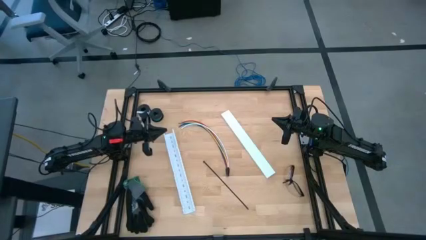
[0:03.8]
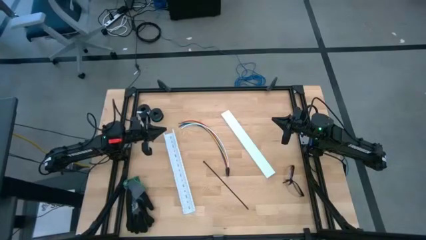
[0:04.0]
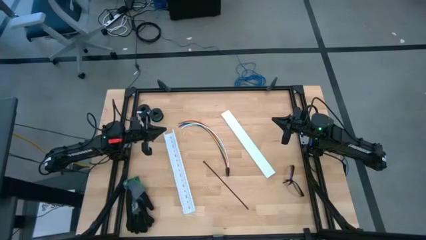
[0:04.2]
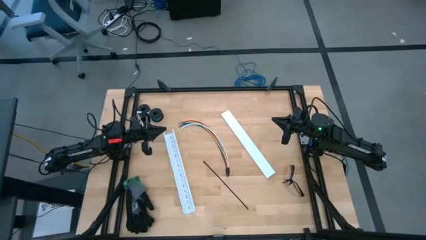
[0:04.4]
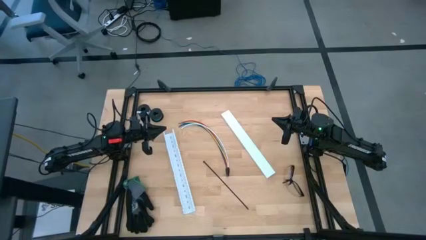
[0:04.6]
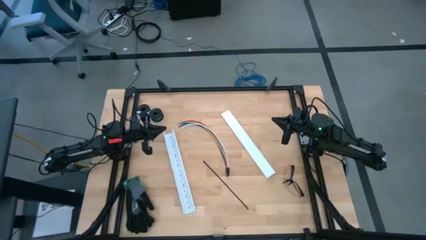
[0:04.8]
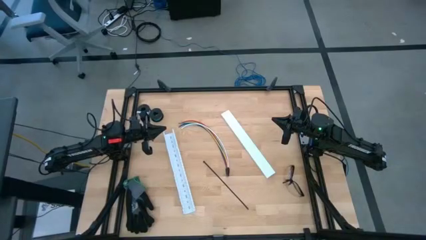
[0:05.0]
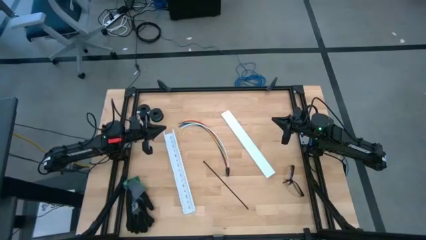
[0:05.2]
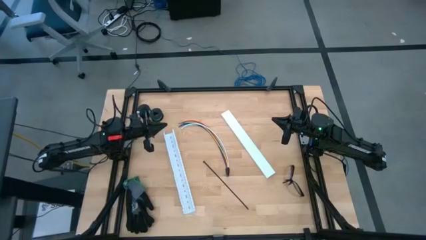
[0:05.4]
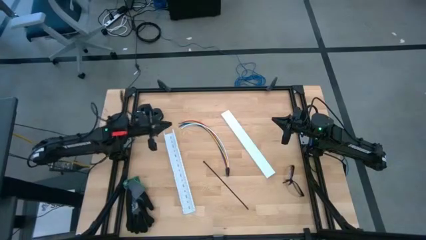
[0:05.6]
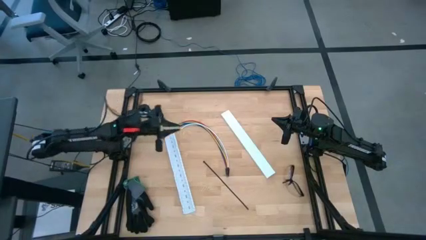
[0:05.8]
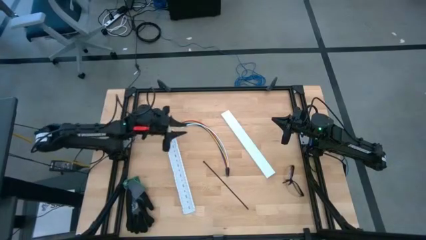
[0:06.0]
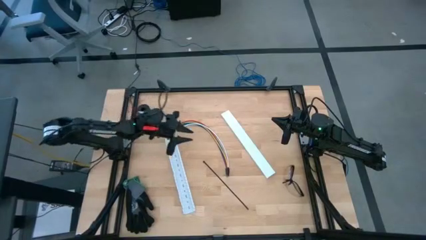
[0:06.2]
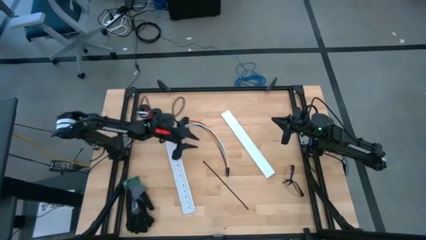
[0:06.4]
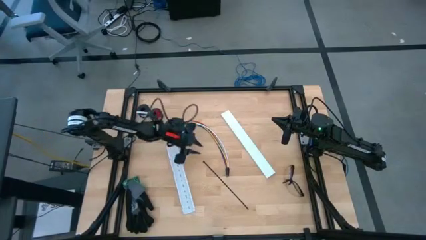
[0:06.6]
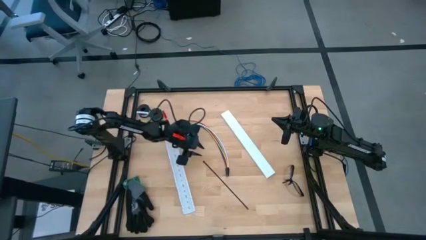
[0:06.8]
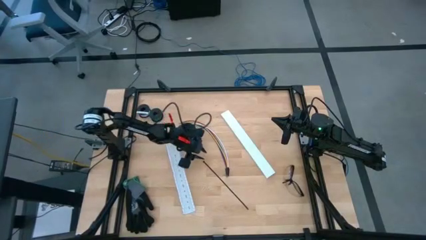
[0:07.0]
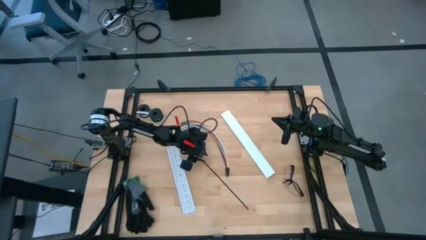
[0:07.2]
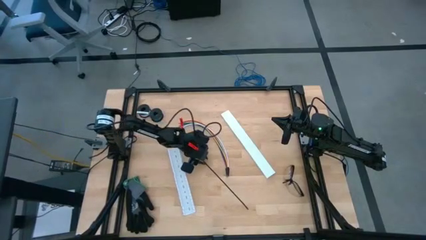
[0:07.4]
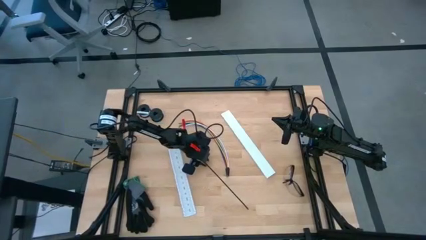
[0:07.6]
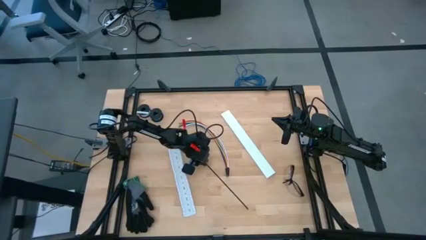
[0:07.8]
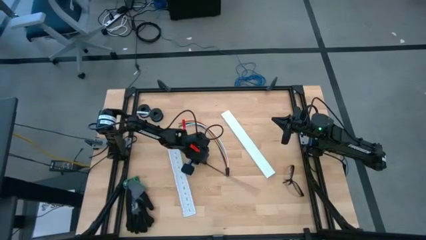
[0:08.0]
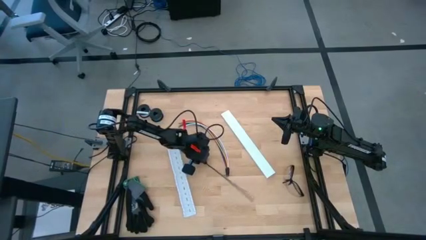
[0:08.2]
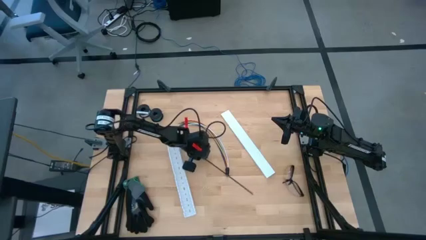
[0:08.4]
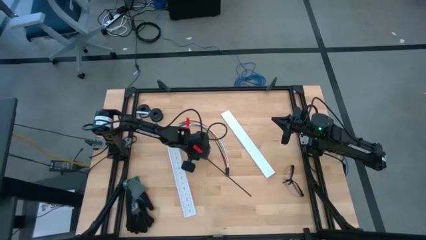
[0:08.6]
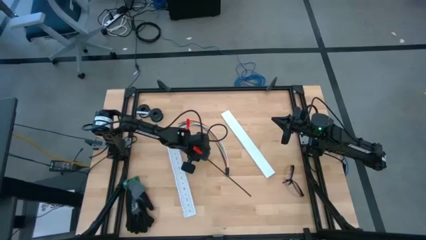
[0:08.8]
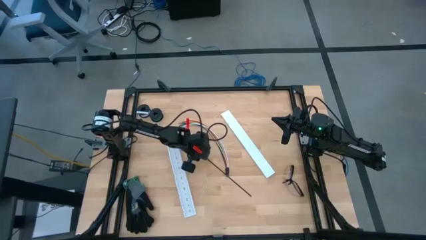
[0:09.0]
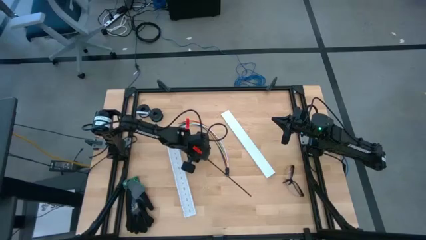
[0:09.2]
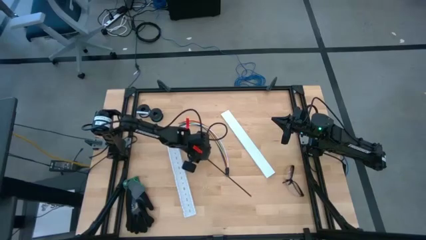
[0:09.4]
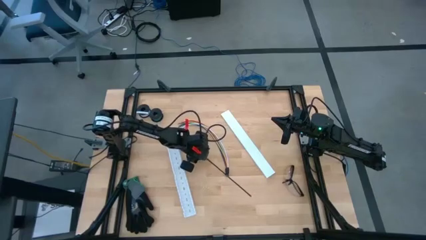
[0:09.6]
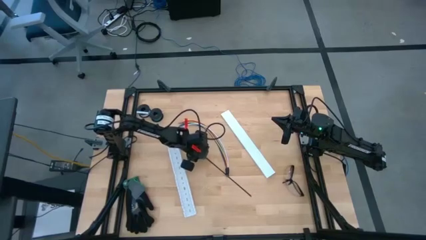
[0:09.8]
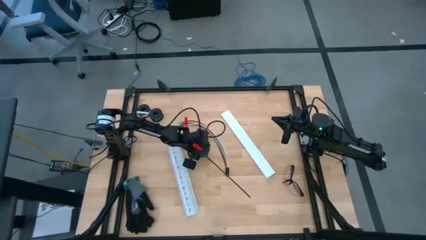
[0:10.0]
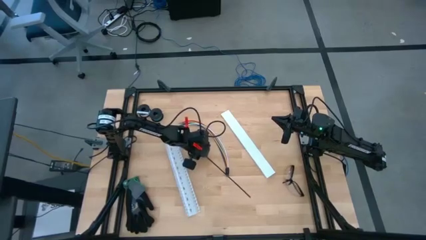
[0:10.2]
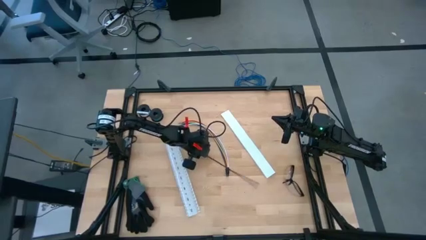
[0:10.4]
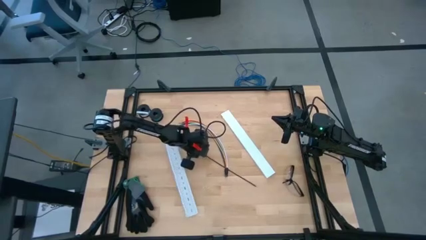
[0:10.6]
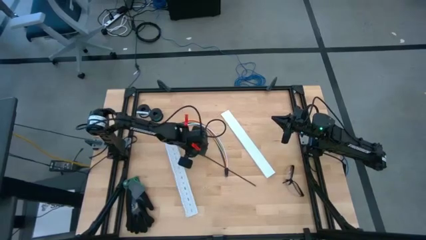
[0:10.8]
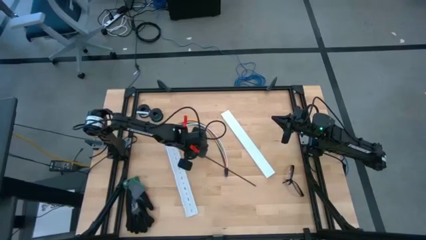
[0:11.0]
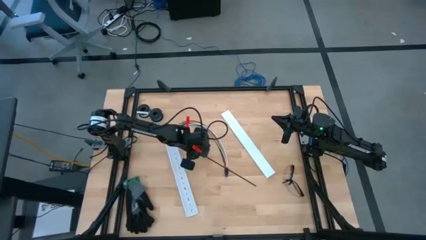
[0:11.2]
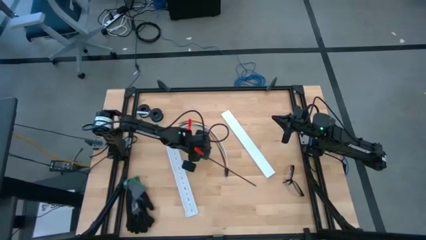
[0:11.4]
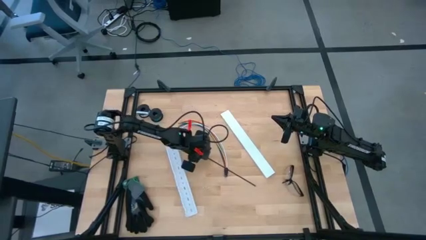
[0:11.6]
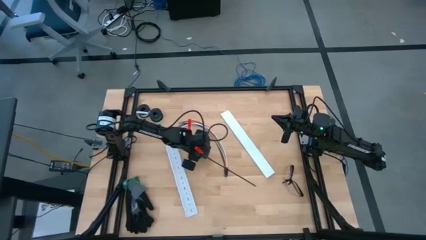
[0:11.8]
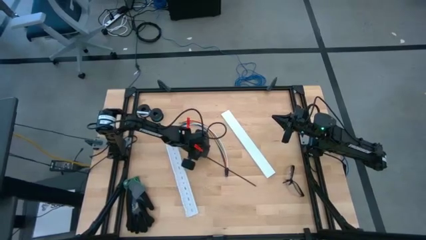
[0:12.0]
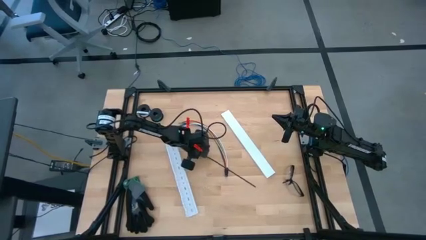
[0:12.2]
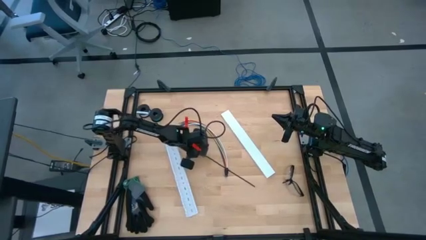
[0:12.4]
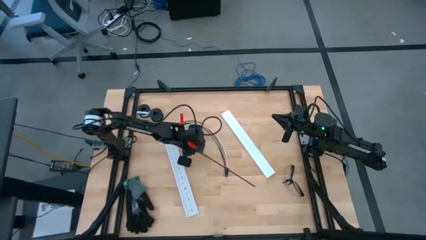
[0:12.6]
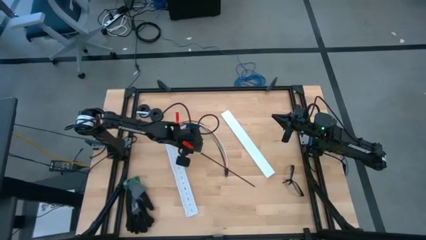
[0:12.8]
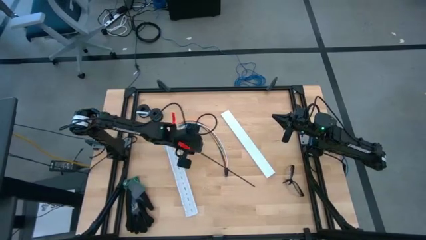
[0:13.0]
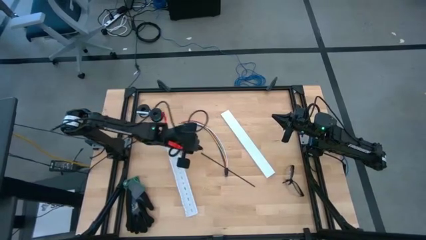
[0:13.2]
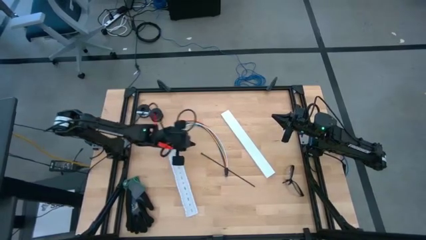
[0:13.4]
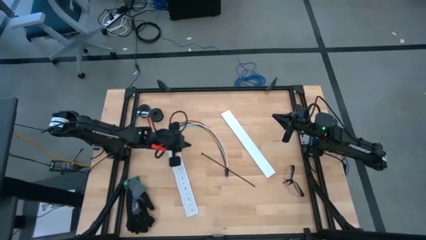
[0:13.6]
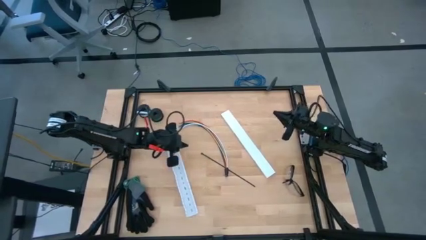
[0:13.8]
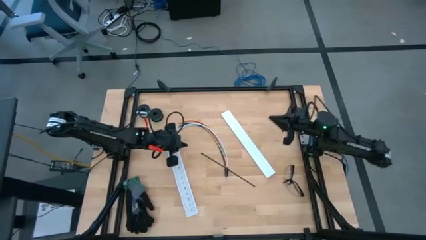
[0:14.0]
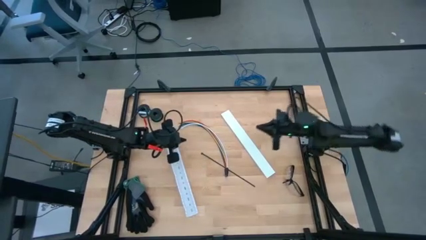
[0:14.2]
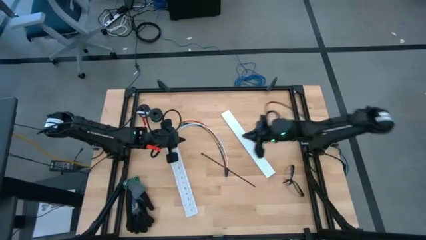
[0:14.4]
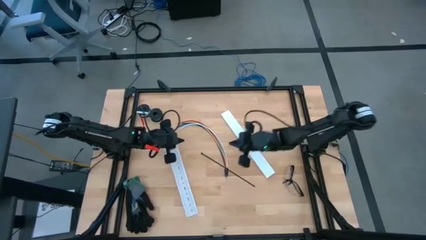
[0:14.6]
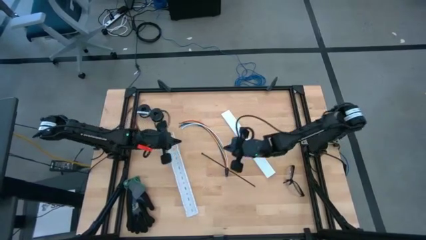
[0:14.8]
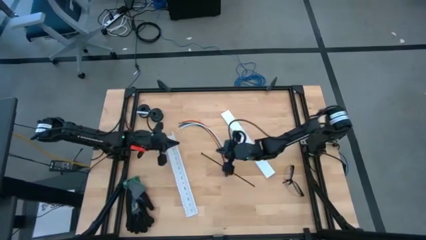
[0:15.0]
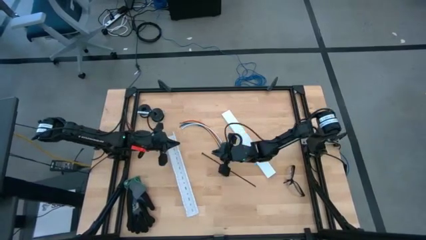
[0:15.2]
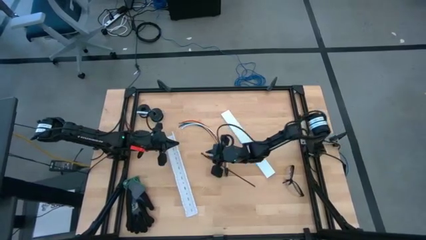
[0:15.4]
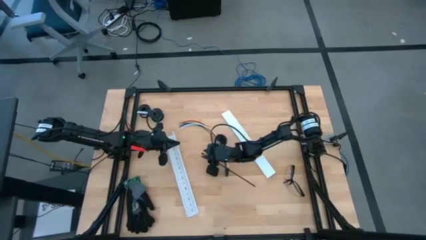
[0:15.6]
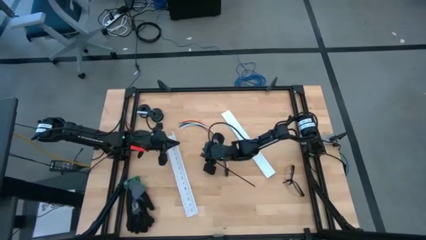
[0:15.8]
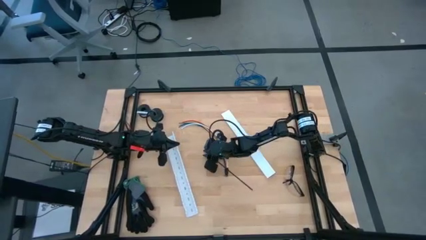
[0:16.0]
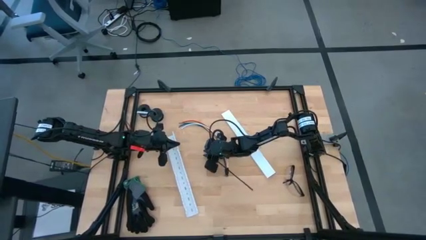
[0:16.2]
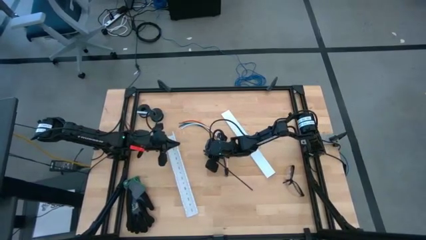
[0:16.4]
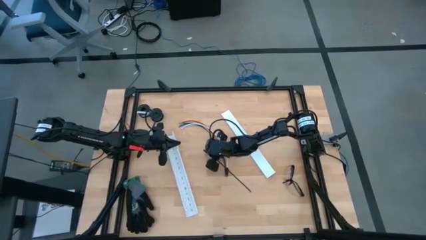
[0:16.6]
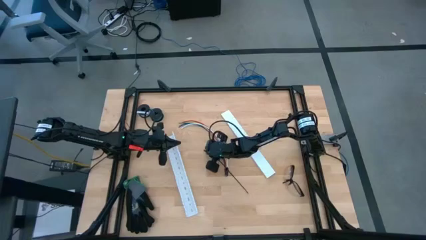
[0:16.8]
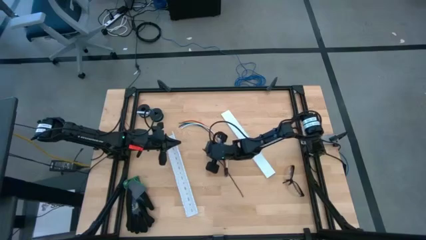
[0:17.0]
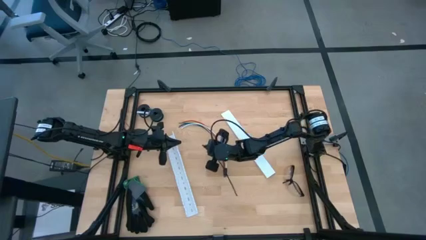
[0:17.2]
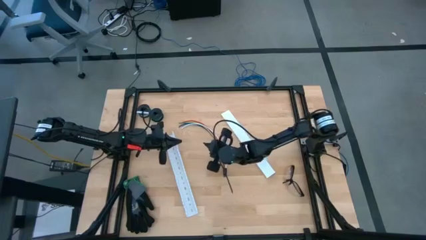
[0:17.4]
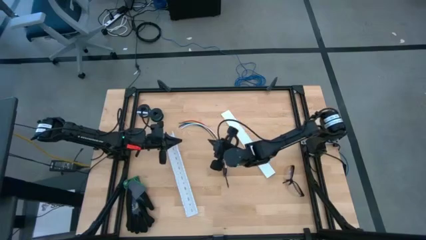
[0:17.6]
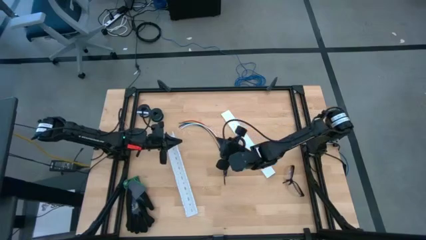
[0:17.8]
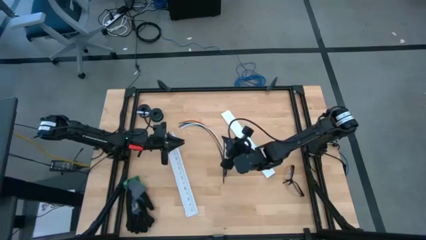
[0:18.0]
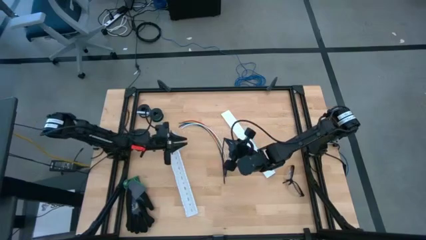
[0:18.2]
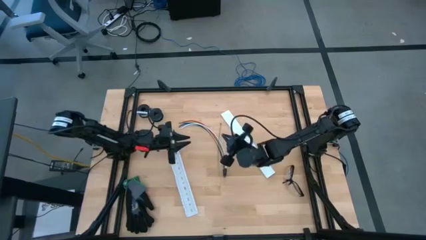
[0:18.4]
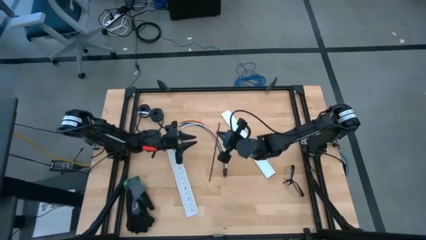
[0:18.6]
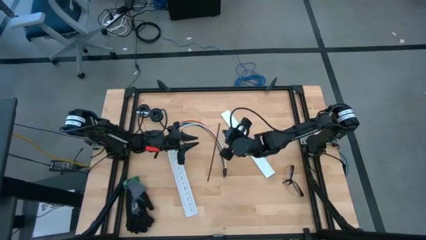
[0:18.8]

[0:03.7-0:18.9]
Task: Ziptie cables
Wrap the cables together using the black zip tie
